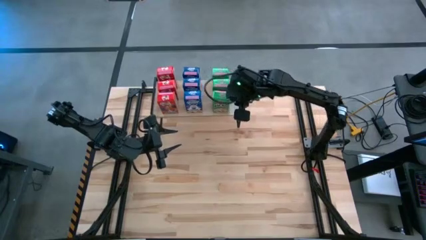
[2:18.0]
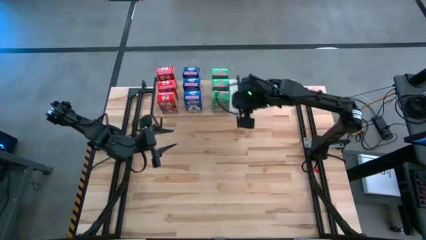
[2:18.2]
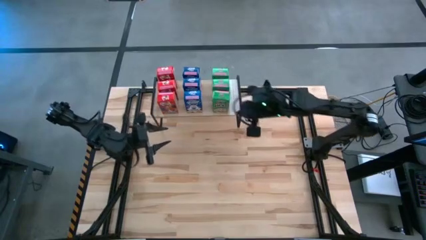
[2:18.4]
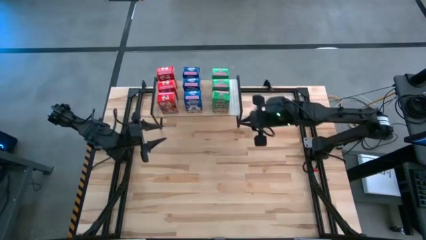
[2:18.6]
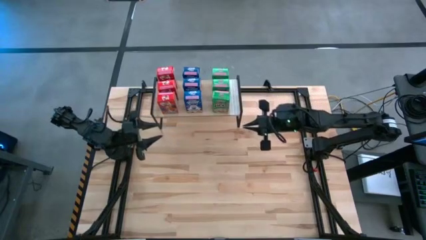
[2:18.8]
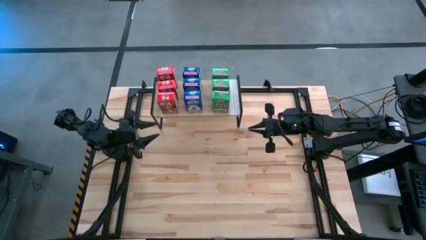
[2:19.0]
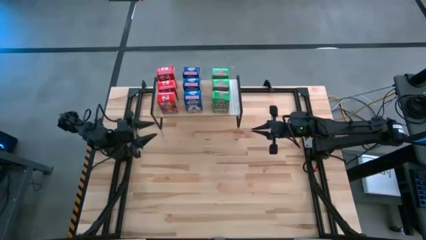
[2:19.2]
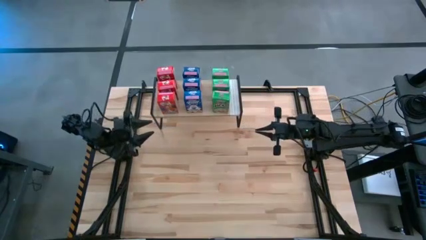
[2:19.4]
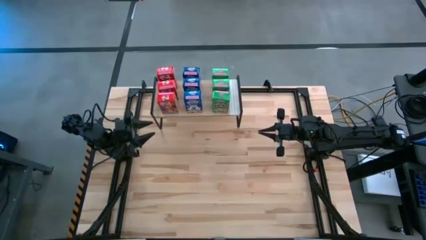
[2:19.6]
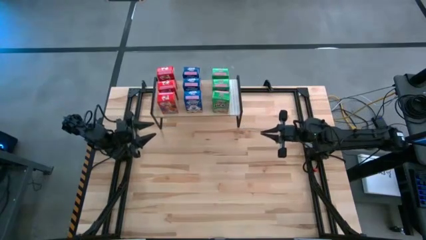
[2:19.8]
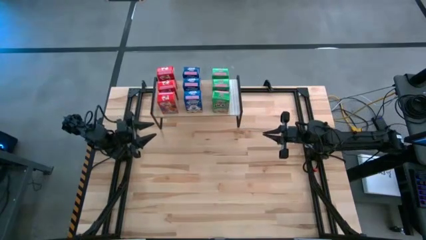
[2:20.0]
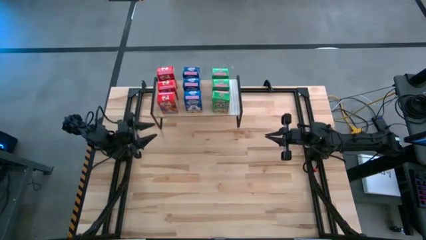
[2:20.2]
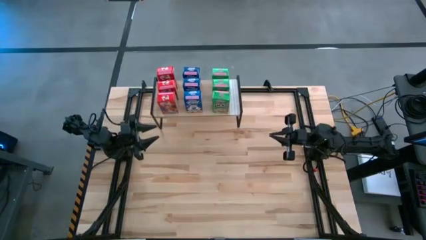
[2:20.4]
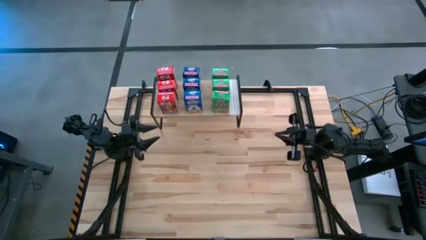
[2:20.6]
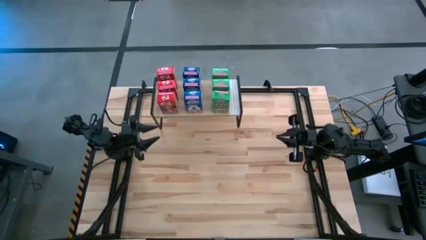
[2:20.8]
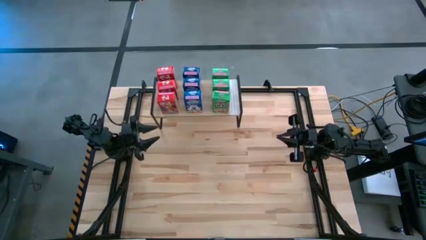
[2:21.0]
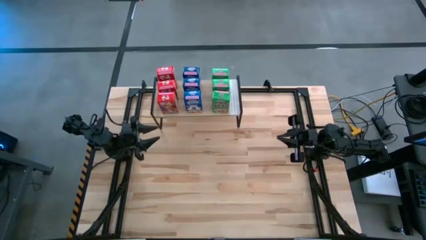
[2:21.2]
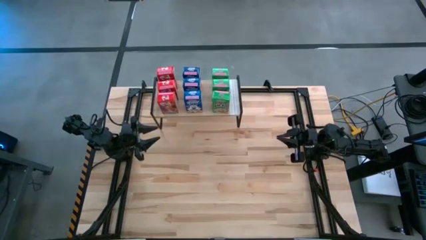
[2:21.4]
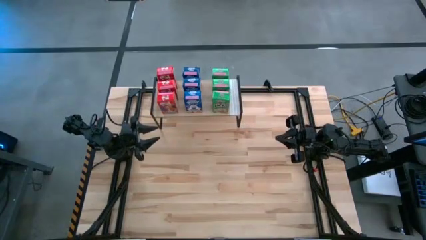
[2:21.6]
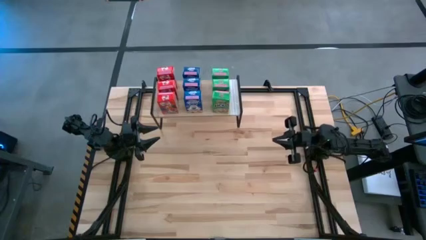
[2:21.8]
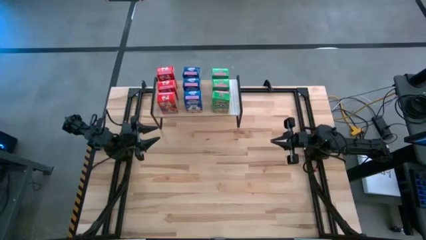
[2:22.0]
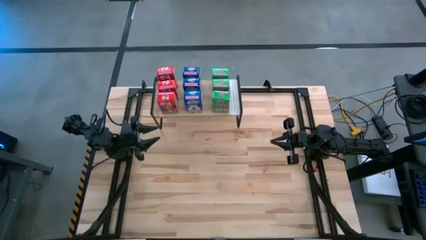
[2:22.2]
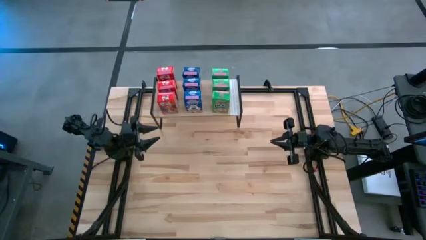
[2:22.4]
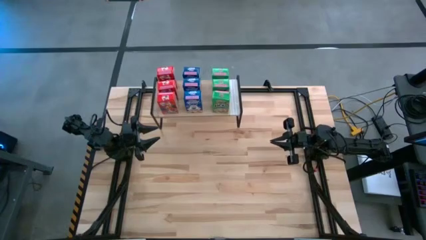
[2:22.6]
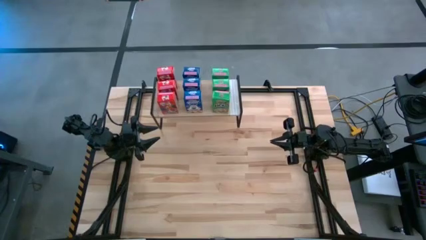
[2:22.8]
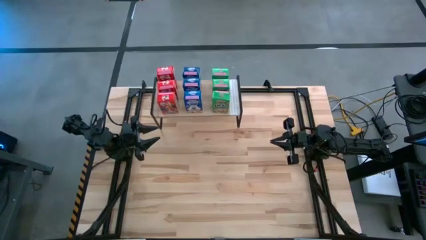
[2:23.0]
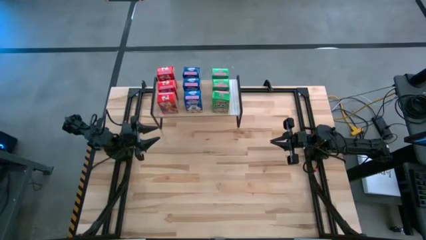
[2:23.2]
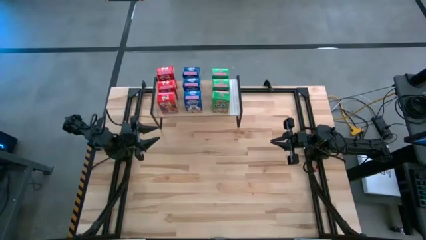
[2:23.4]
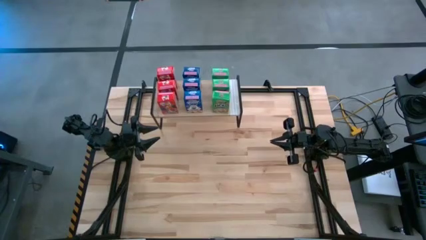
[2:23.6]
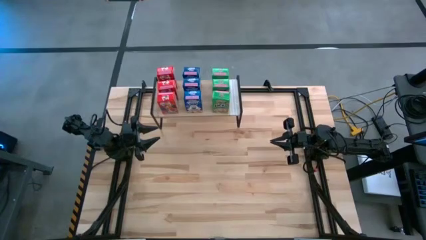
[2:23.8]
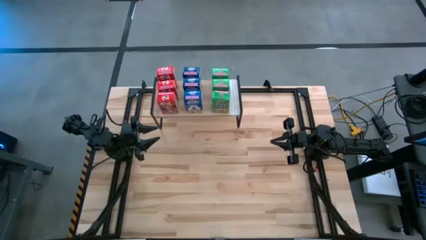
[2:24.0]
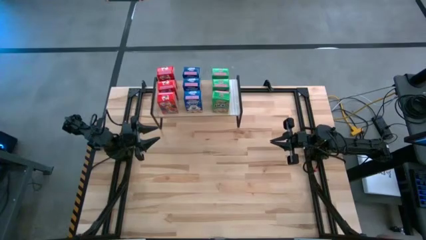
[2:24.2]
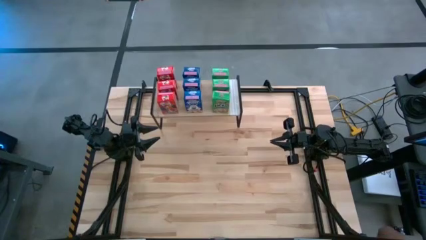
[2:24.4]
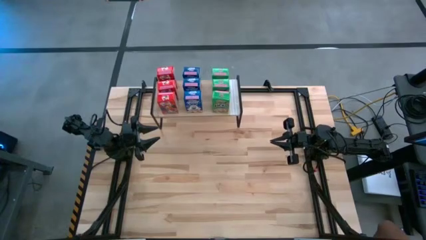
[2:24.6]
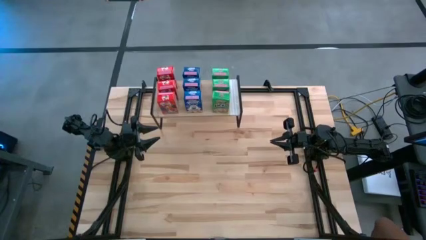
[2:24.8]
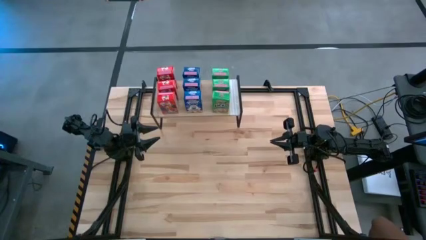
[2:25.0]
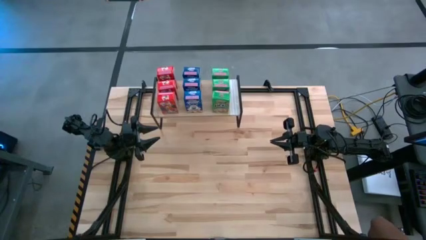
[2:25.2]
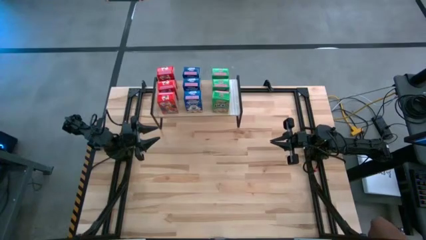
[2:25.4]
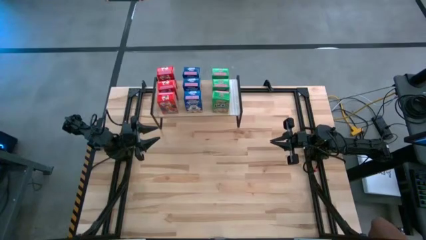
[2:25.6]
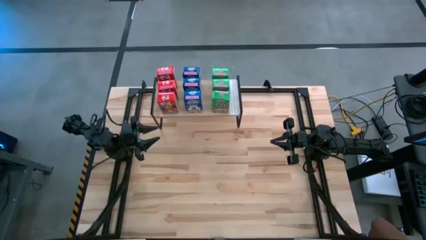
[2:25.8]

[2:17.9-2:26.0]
Task: Stack cereal on shelf
Return to Home Position

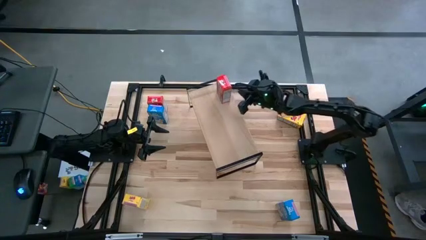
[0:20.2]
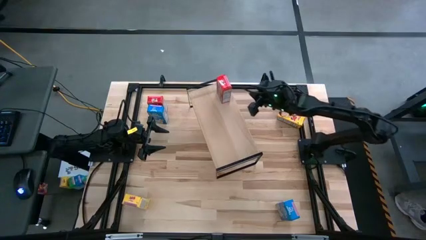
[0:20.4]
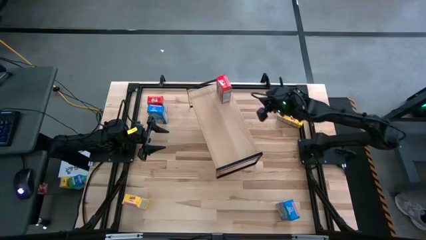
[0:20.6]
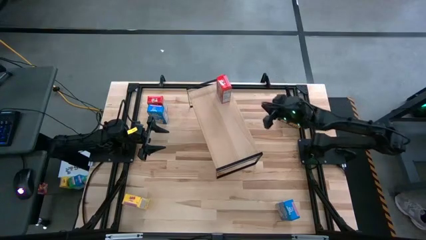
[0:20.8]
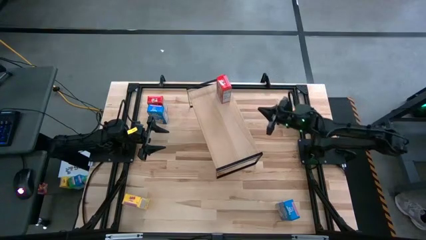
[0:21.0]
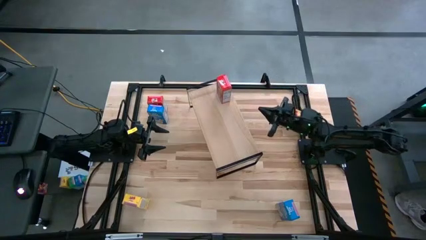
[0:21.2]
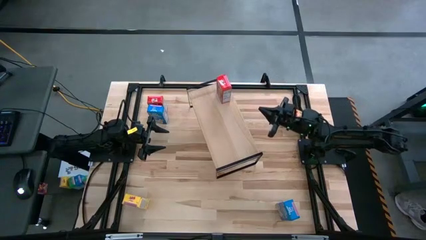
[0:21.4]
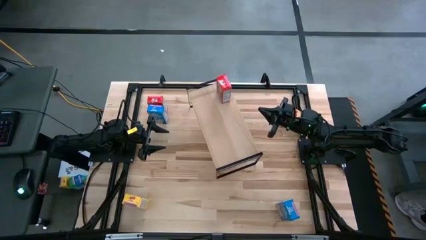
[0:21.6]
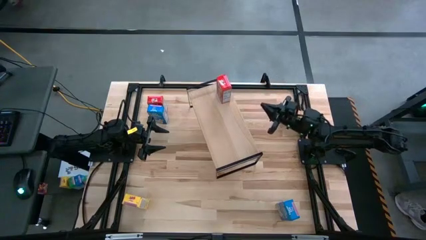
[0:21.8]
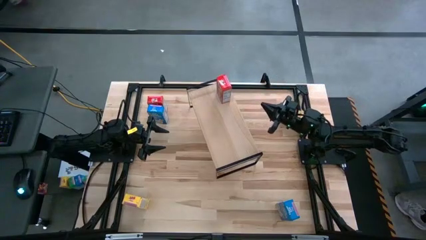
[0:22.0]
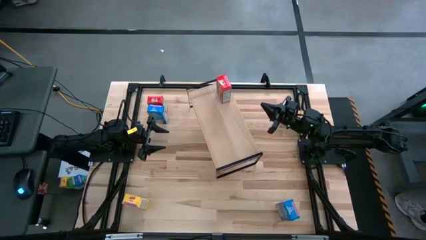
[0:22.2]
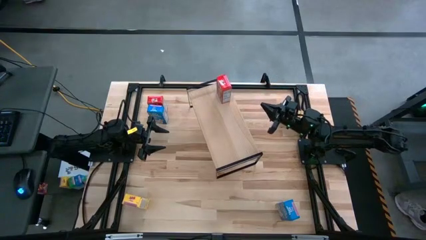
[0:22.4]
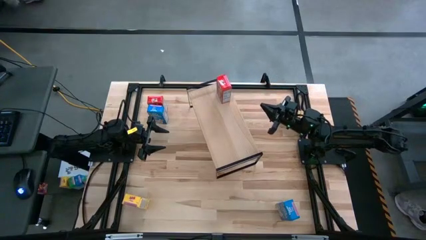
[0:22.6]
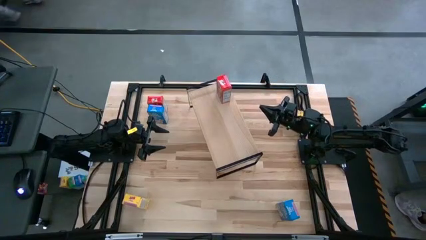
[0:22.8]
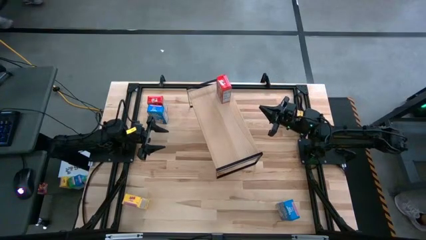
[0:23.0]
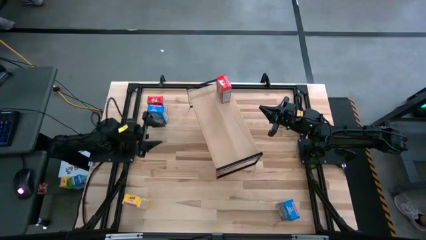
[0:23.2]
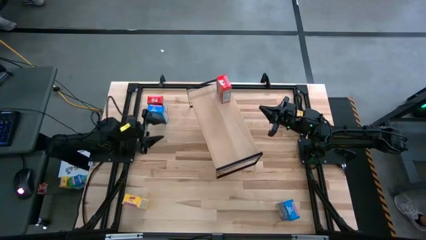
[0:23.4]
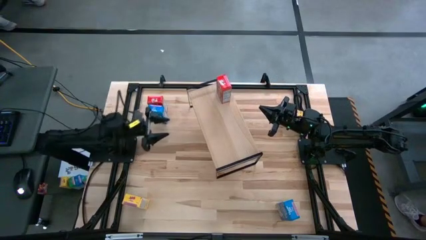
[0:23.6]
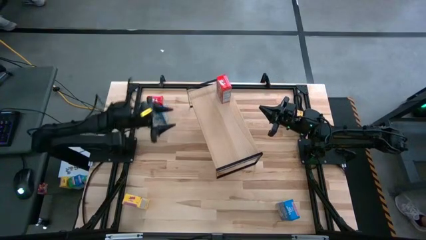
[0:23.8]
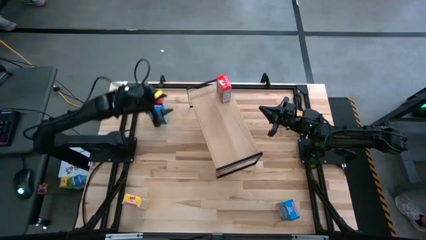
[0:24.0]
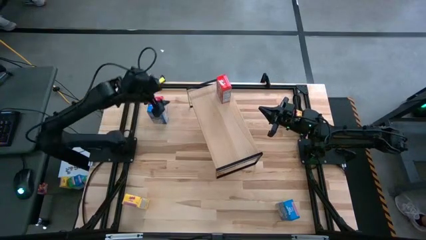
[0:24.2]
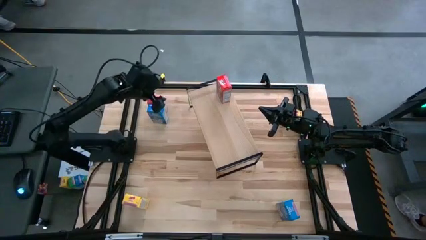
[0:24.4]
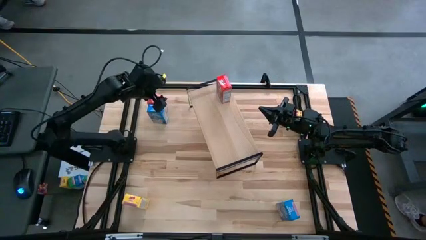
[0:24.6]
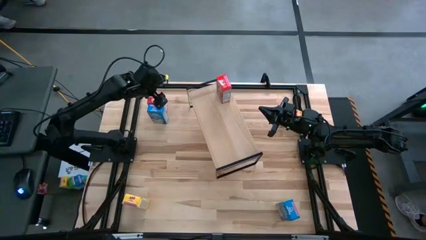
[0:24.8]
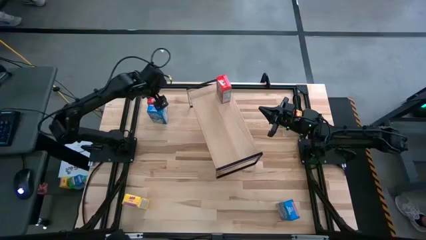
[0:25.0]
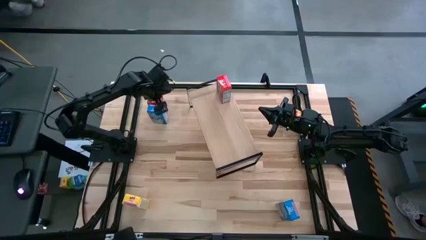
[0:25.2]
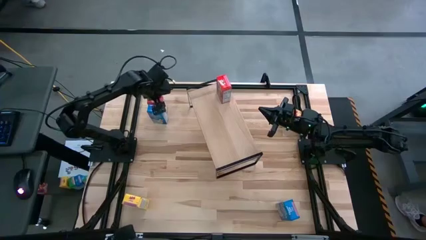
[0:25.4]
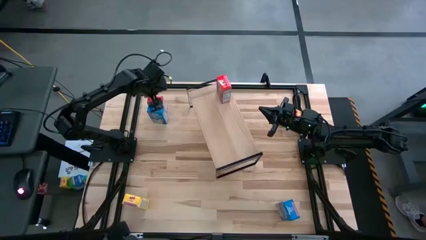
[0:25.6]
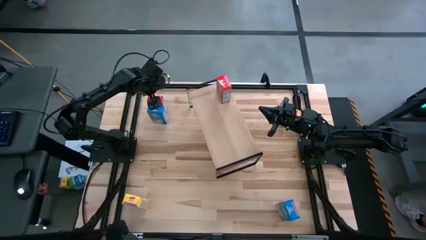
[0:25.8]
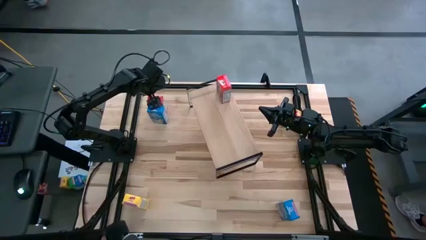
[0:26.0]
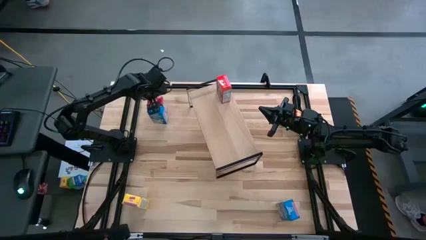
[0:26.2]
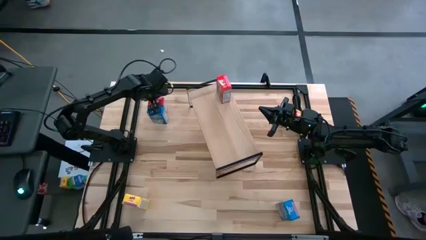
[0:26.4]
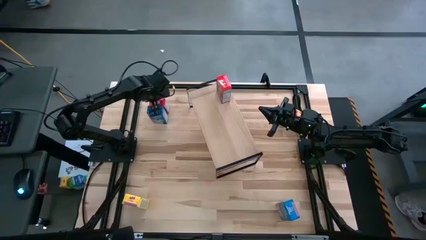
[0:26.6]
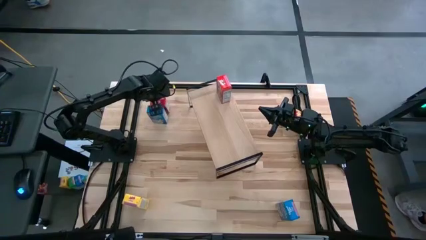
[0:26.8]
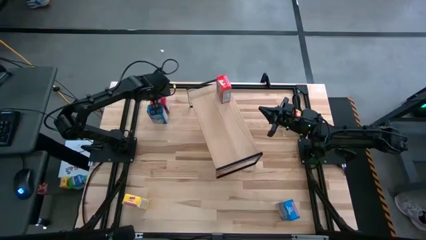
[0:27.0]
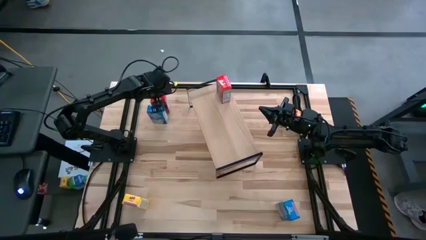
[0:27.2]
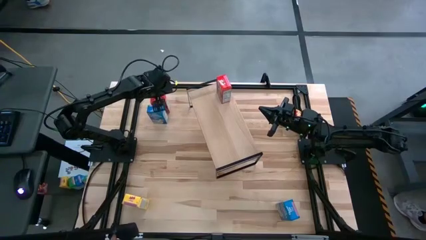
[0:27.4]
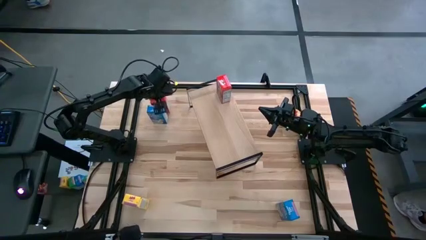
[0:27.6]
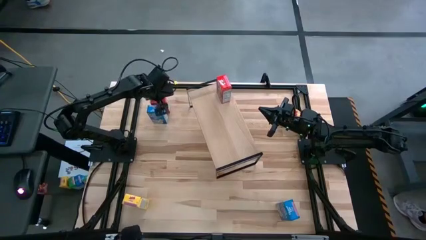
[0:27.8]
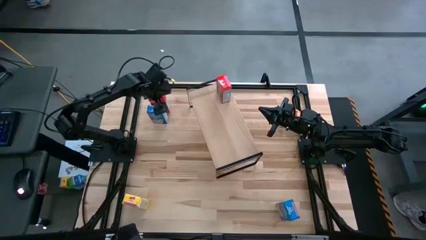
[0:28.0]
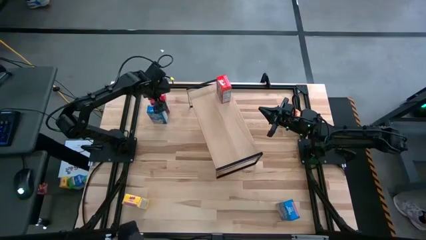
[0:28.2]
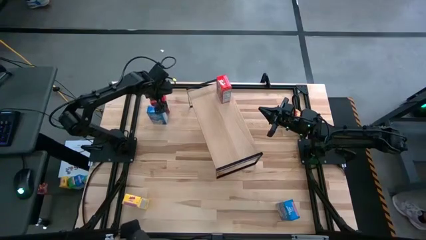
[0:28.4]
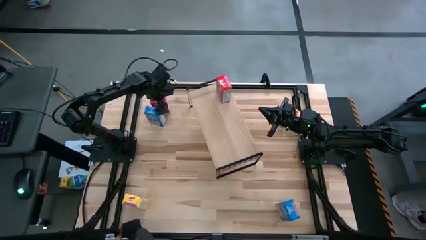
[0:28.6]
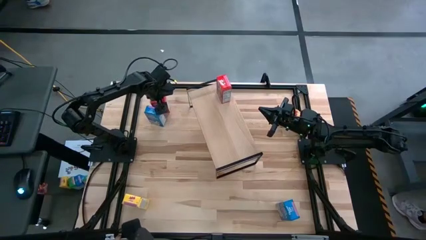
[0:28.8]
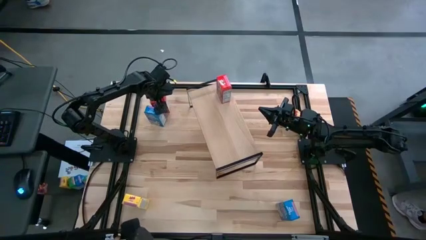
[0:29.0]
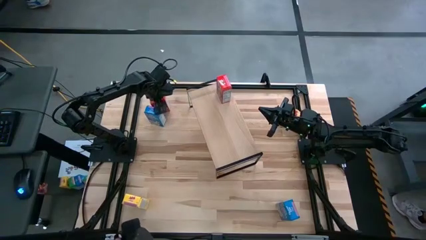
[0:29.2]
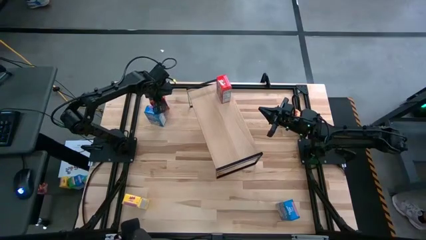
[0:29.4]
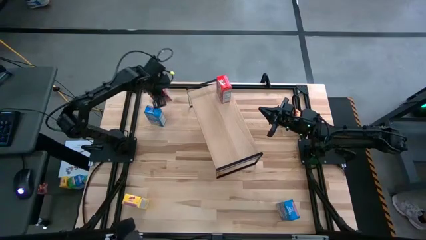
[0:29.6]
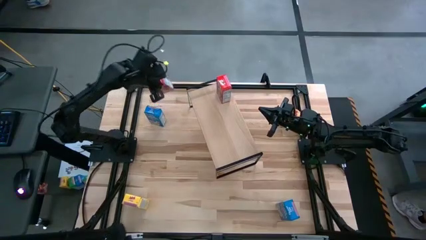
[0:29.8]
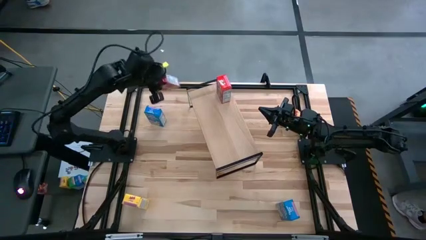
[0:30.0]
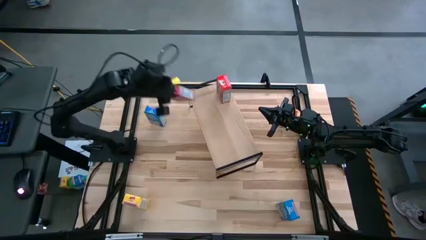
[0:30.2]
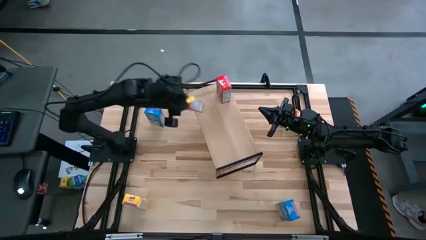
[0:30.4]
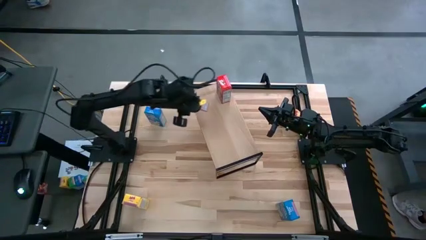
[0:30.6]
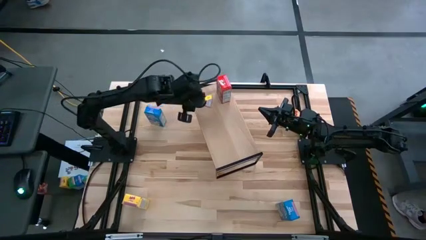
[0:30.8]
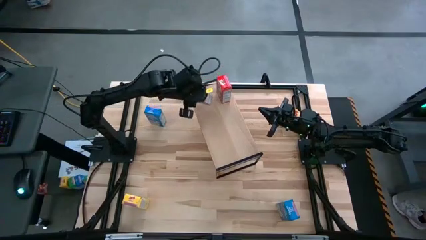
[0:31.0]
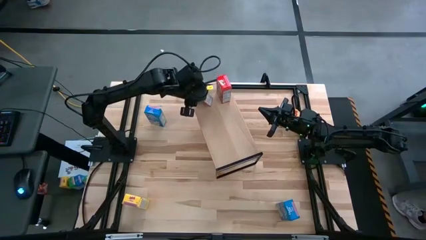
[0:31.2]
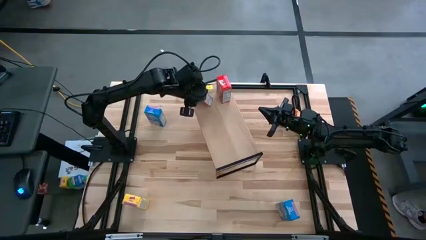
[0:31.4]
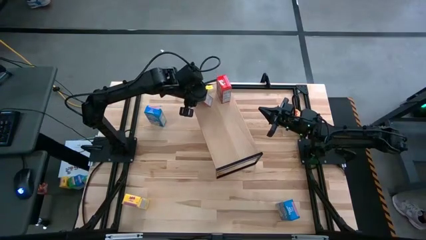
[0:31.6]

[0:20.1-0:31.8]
Task: Stack cereal on shelf
Put the red cereal box aligned with the other red cereal box on the shelf
